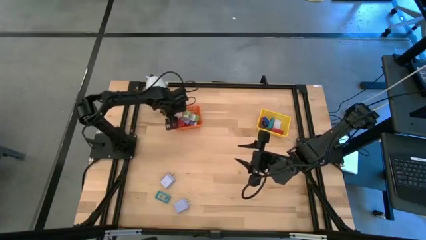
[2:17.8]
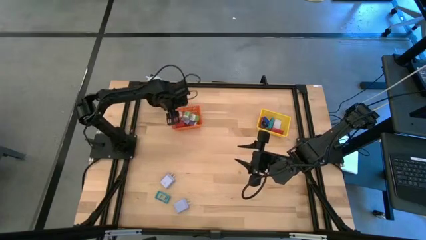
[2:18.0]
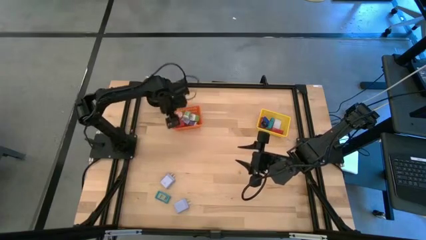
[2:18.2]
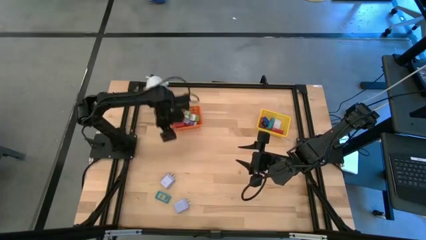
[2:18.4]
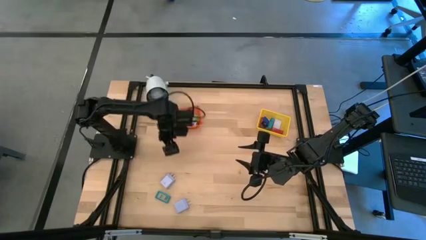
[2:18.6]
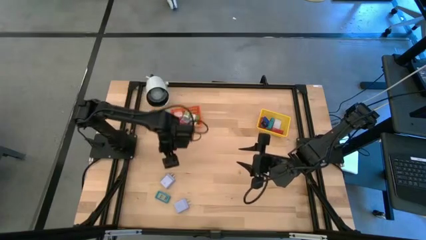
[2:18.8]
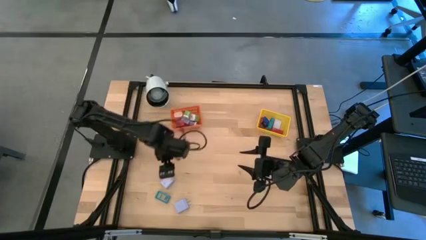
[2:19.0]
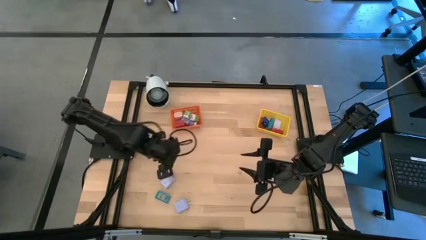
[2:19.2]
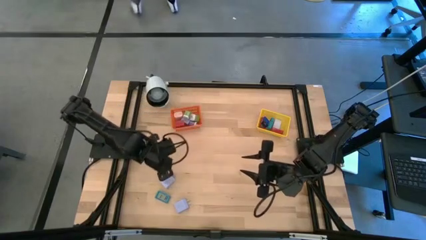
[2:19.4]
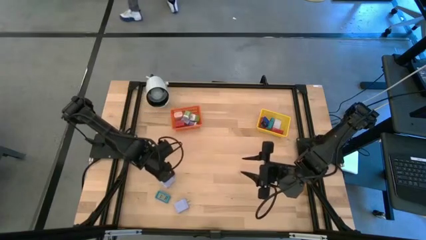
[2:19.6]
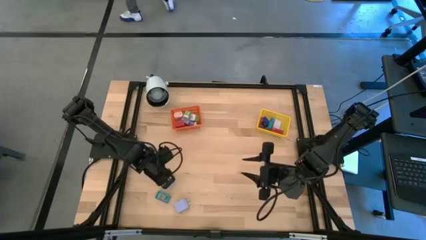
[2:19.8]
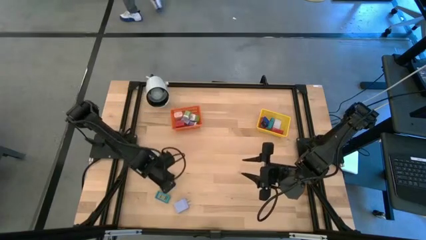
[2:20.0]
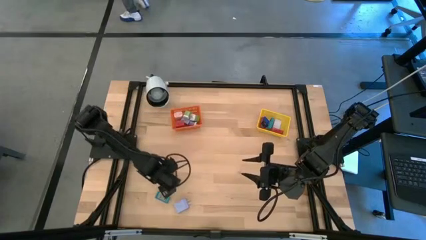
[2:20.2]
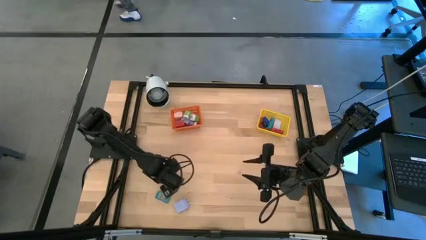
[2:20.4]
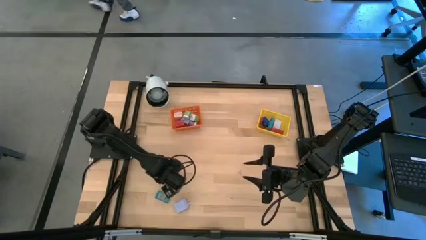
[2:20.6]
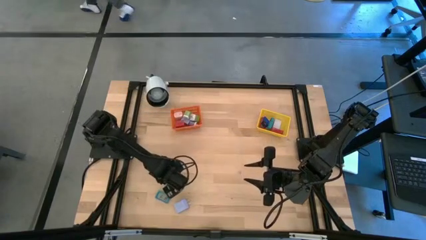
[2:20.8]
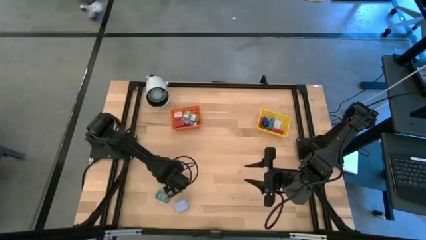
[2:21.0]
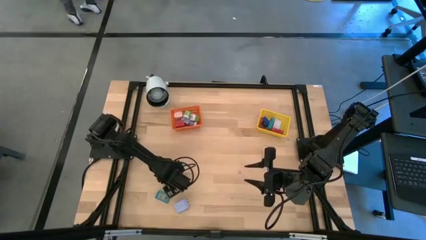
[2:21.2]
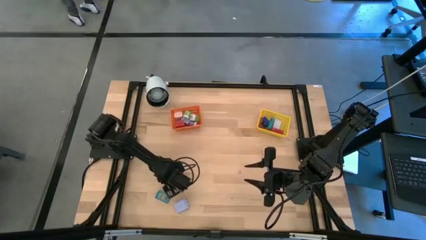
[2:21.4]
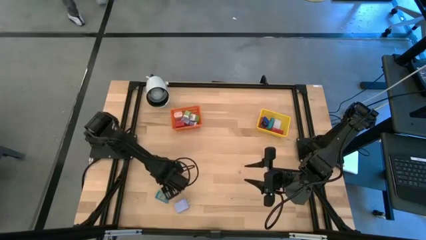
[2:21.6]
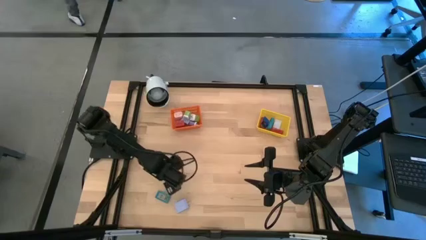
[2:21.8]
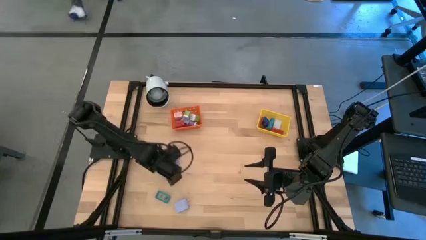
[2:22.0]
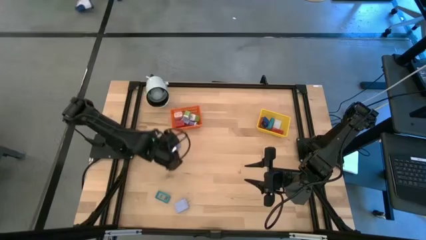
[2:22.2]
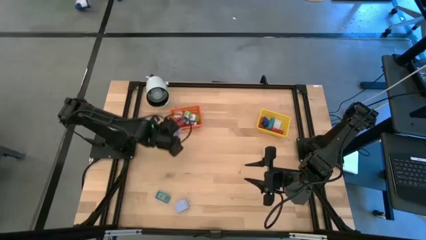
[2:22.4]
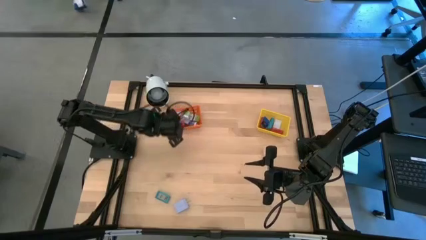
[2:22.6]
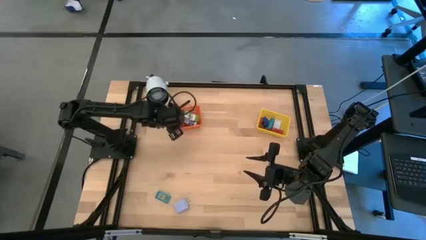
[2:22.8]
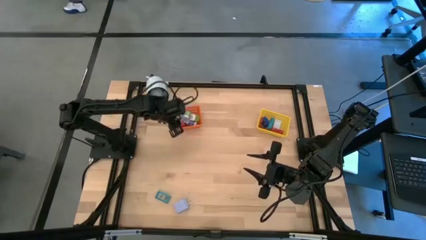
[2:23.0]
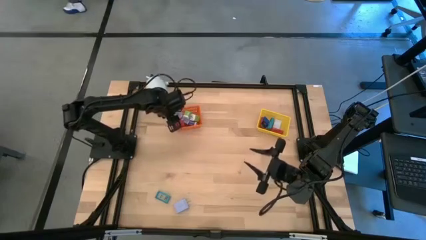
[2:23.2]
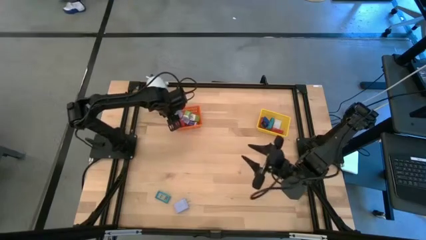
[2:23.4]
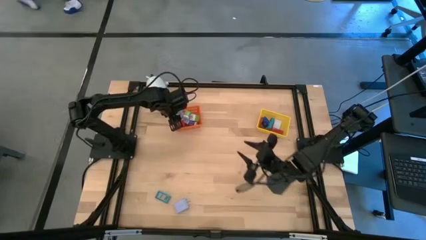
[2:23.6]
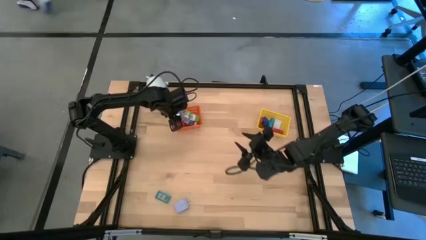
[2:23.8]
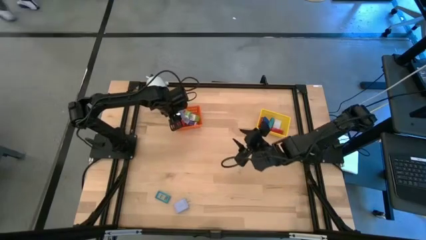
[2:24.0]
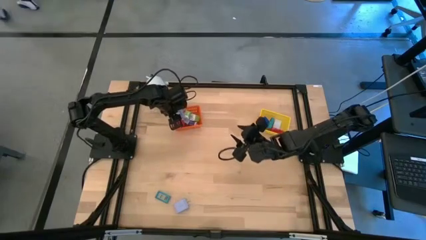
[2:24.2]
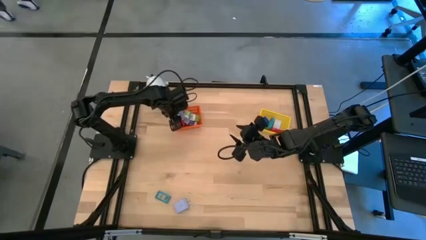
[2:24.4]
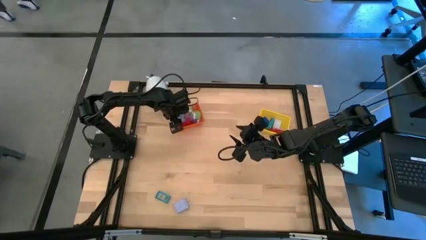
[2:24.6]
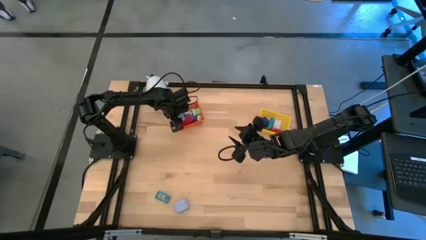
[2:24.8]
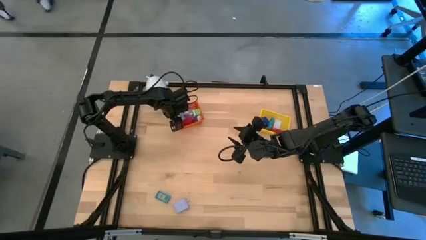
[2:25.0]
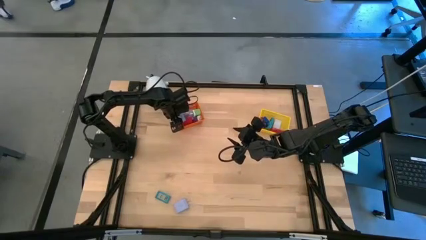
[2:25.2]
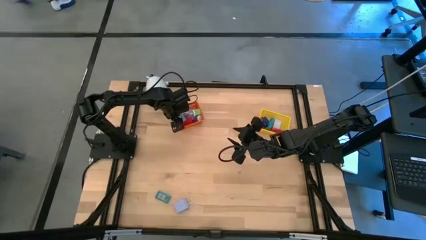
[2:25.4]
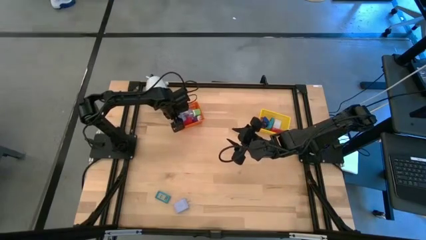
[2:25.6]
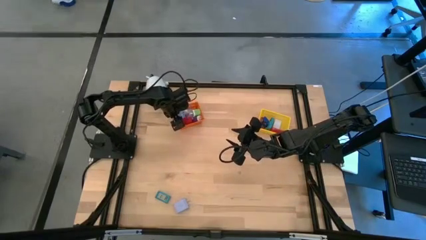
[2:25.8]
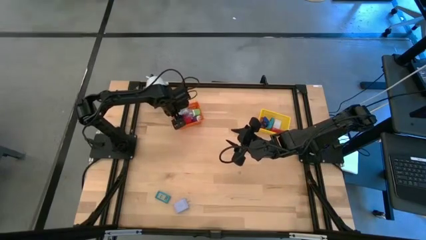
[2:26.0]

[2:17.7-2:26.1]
Task: Pick & Place Office items
Put the top purple charger adapter into the orange bin

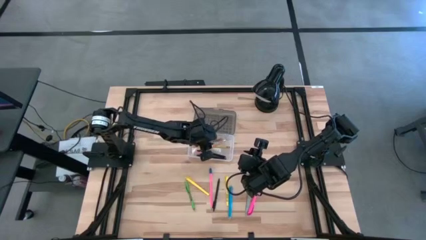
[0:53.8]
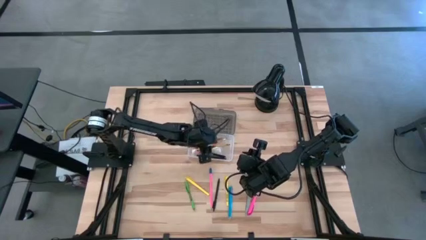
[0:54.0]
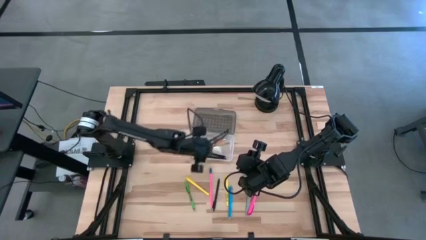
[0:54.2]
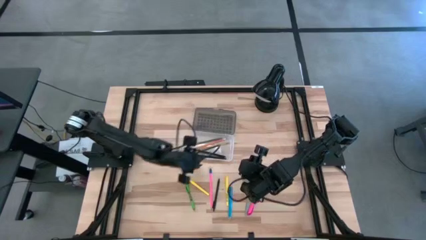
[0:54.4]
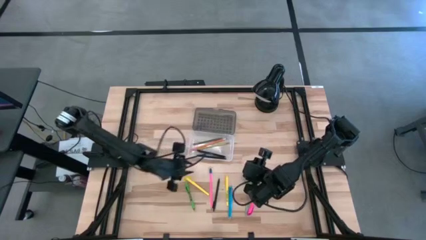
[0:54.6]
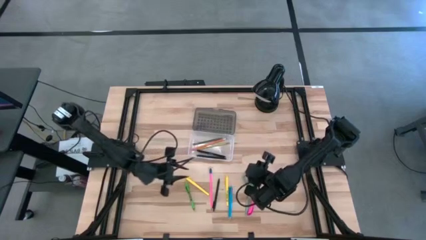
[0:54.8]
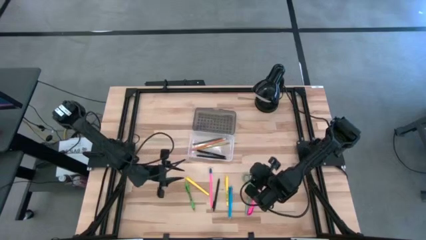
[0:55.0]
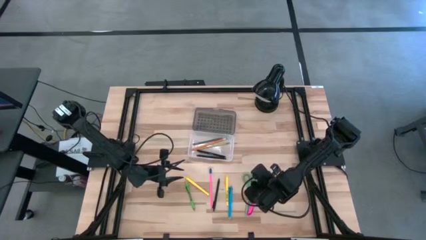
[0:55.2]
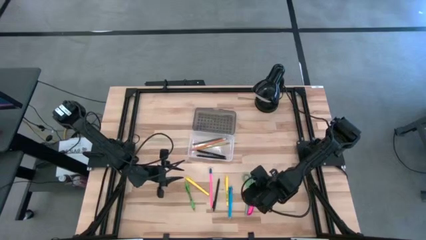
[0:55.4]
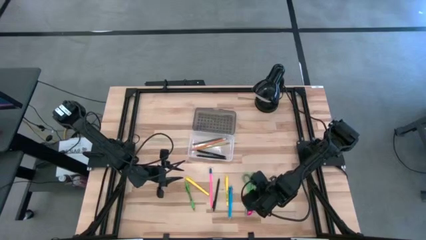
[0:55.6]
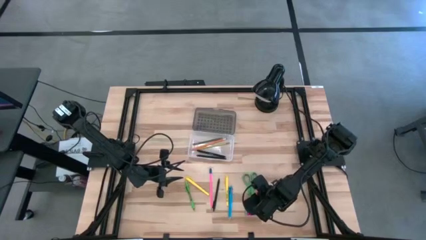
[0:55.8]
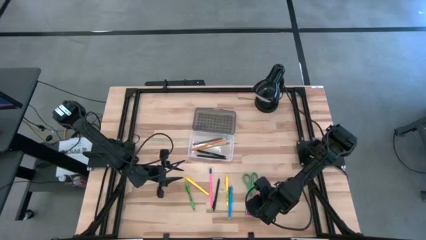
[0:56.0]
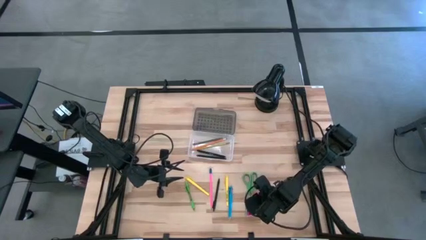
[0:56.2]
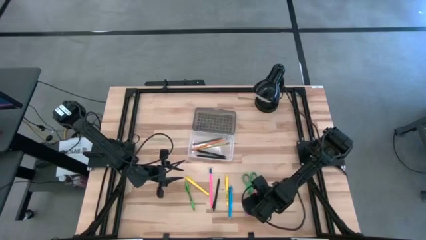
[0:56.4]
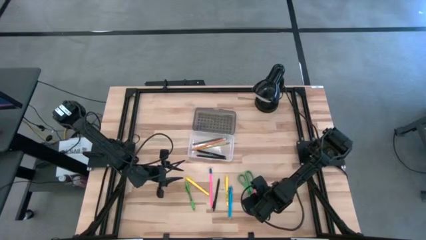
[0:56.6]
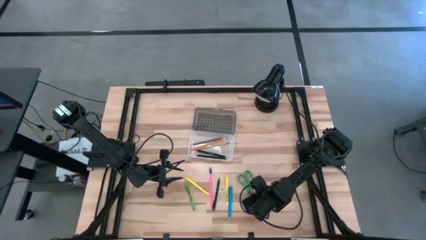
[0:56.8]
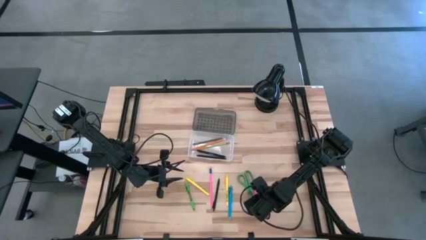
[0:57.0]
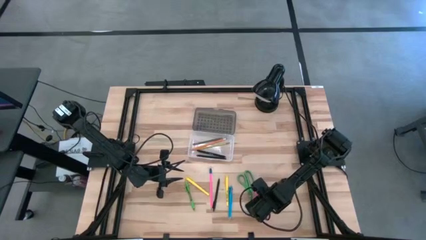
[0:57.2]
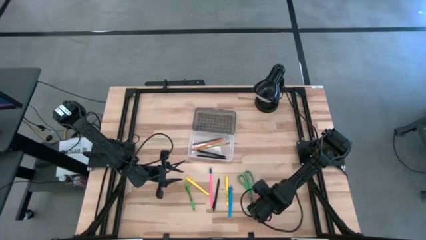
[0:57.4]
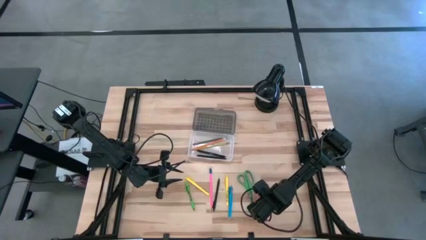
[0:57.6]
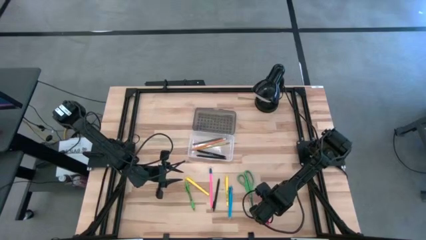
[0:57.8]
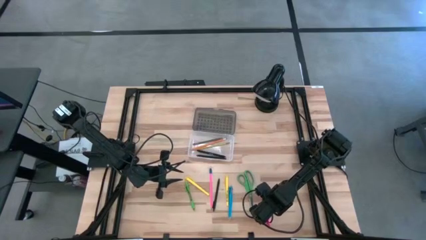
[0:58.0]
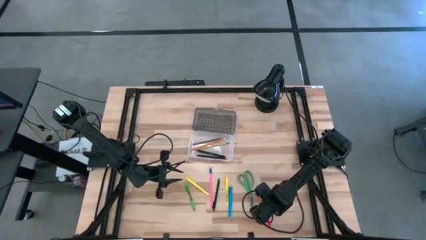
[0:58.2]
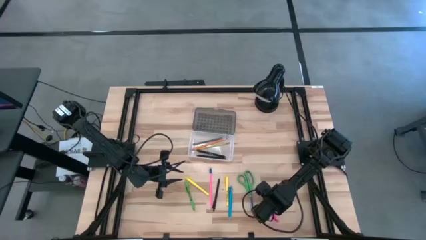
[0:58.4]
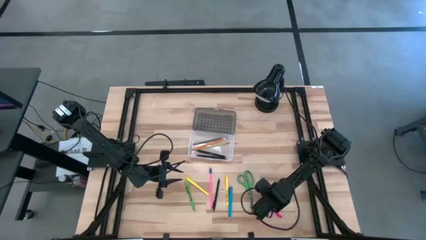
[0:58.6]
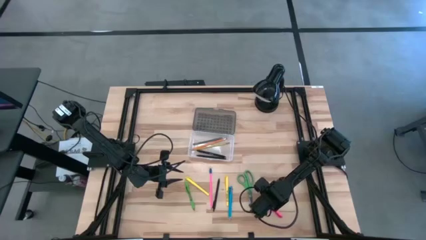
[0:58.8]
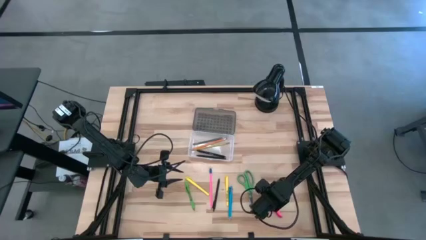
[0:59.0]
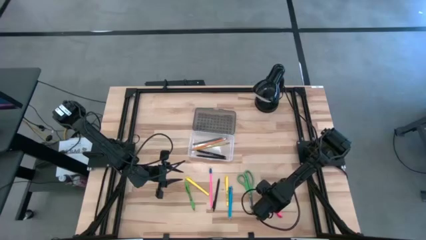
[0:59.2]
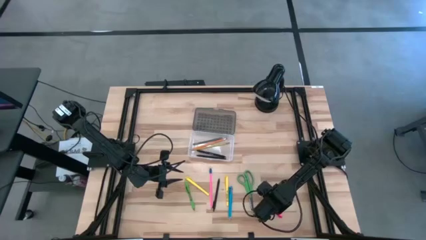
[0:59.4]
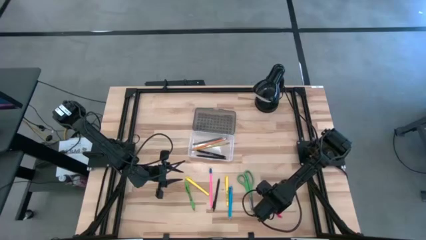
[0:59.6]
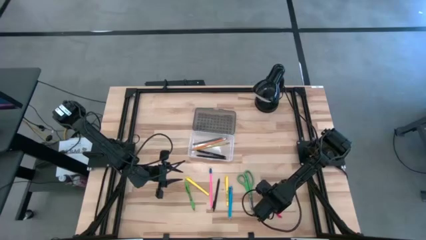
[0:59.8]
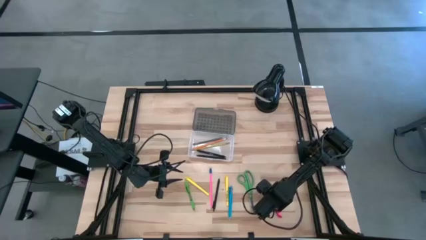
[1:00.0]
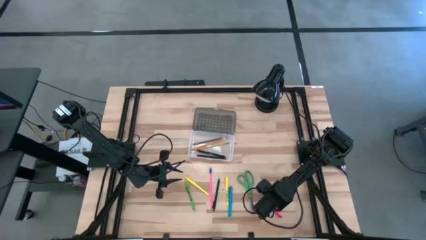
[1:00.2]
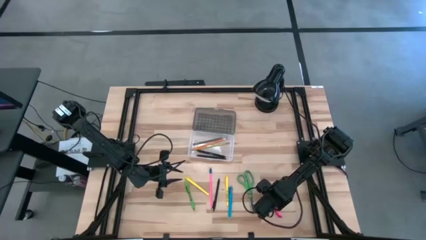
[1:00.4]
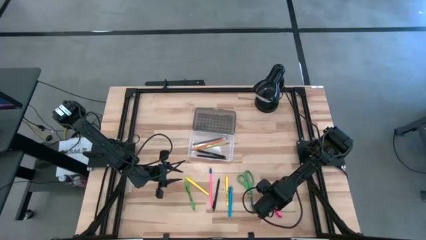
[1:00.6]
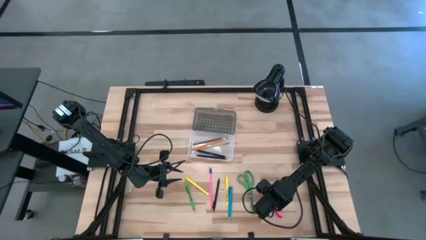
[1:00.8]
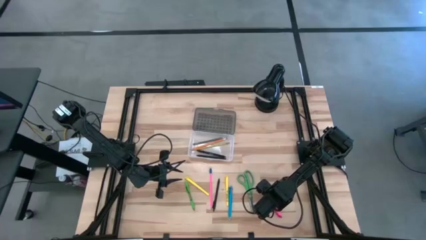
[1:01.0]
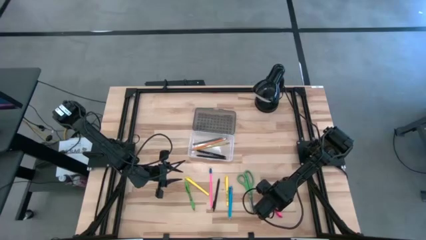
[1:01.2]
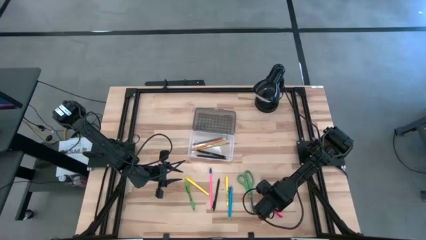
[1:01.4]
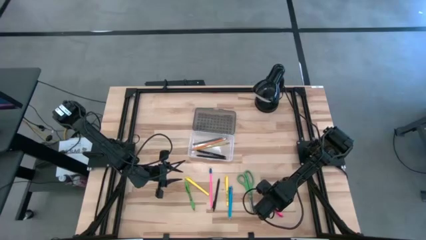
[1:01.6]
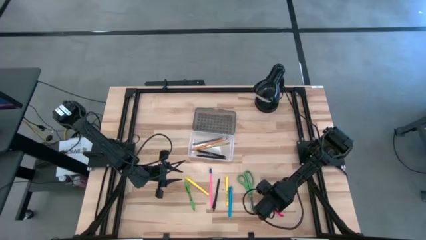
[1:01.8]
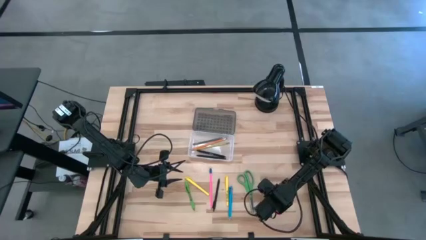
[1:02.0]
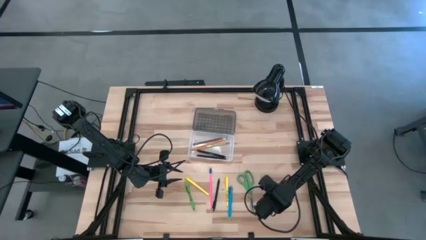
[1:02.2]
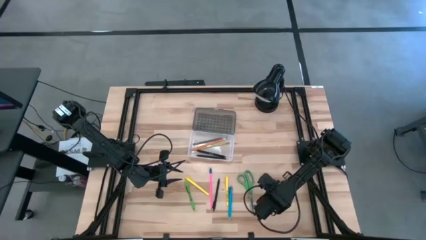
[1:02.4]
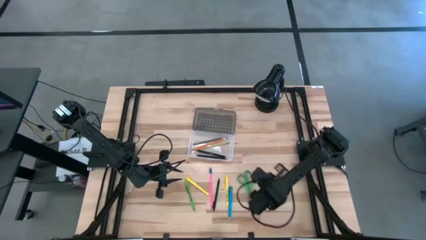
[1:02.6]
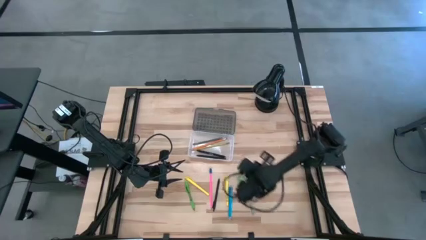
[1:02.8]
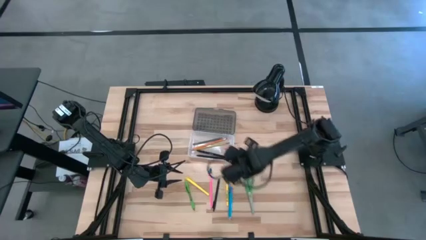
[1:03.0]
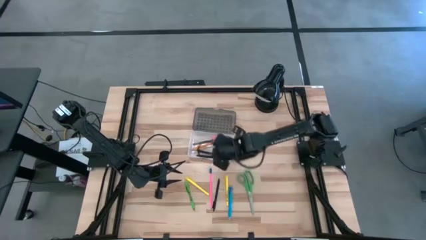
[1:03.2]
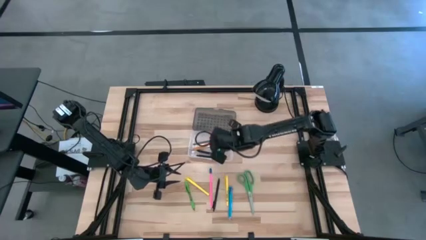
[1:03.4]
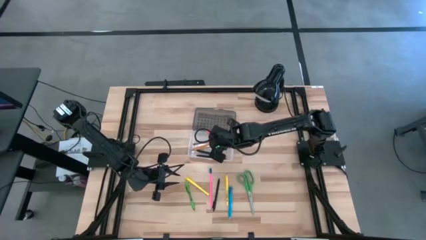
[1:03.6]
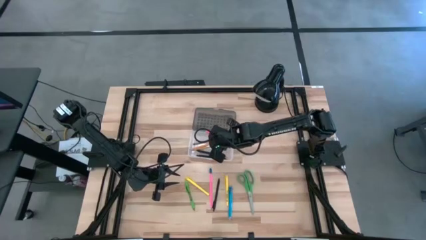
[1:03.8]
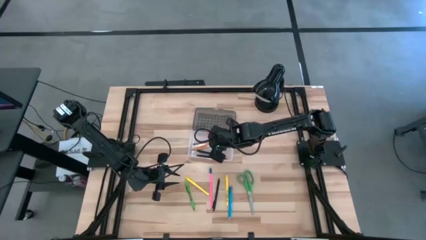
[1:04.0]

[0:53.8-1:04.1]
Task: Pick & place school supplies into a supply box
Put the pink pen into the transparent supply box
